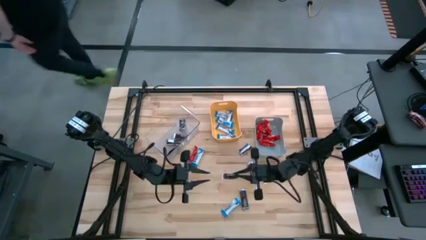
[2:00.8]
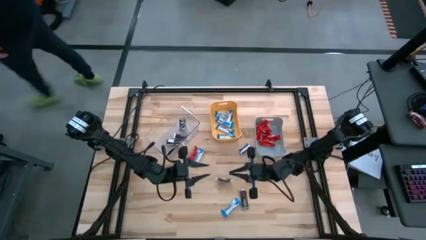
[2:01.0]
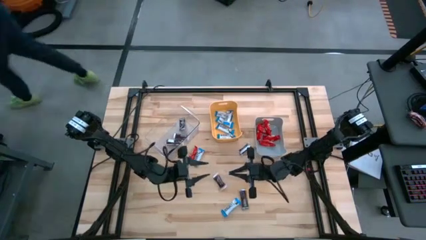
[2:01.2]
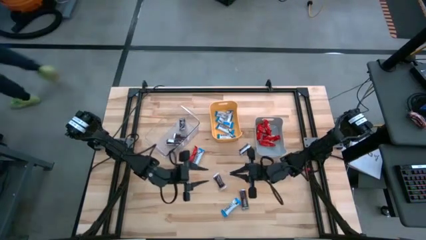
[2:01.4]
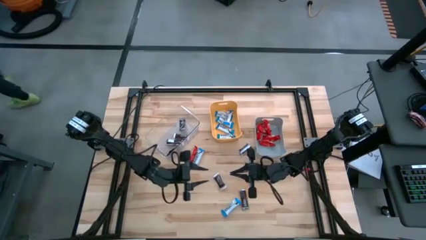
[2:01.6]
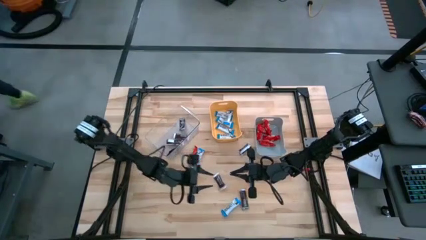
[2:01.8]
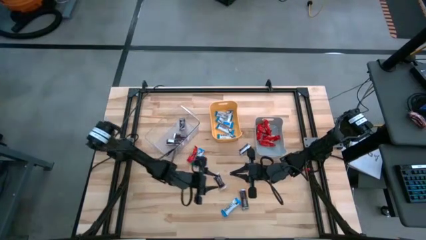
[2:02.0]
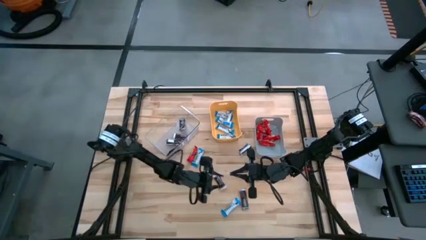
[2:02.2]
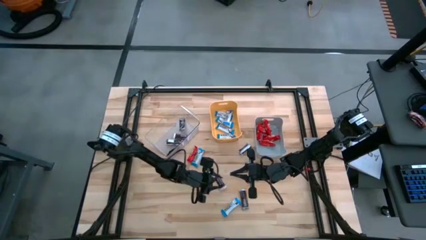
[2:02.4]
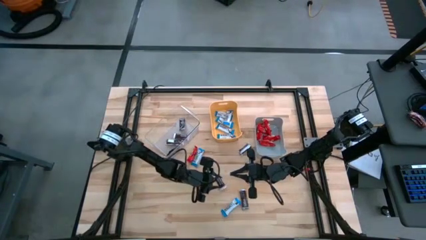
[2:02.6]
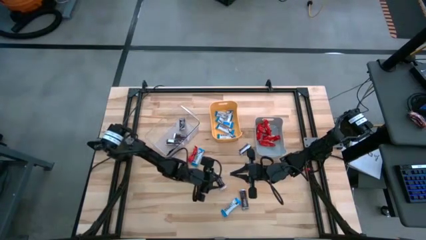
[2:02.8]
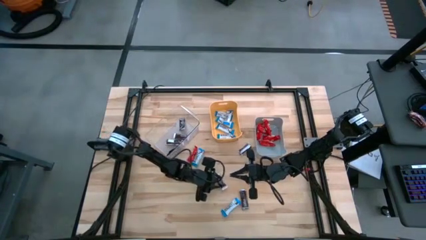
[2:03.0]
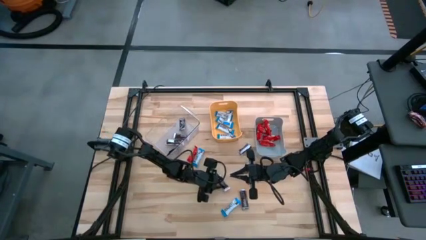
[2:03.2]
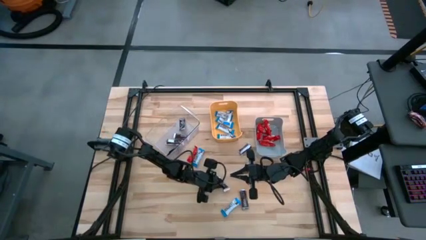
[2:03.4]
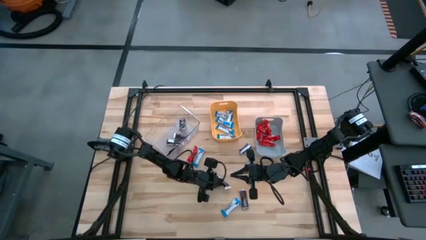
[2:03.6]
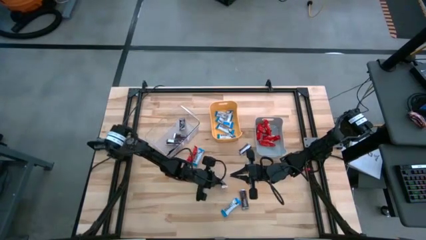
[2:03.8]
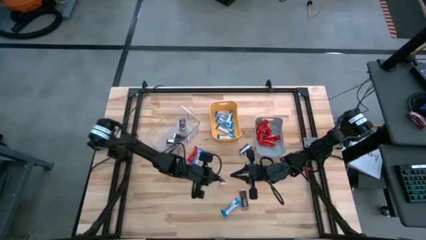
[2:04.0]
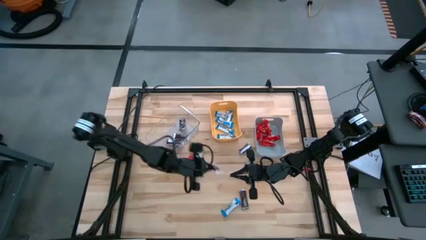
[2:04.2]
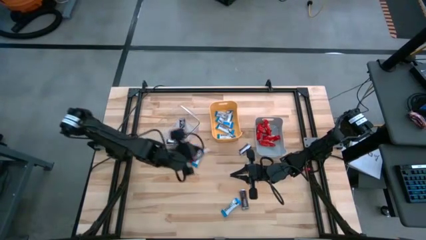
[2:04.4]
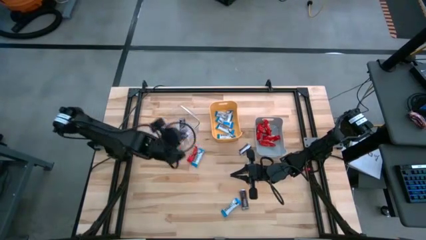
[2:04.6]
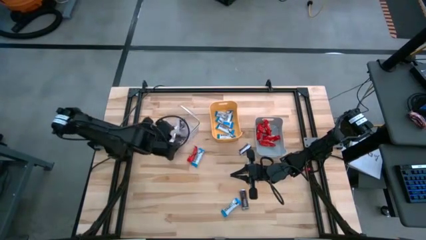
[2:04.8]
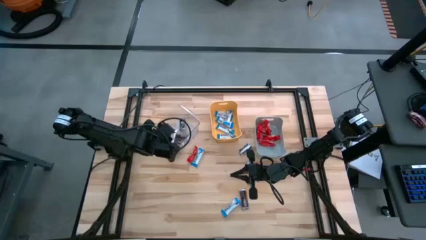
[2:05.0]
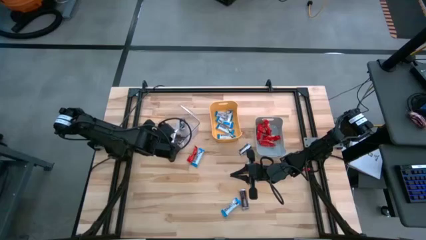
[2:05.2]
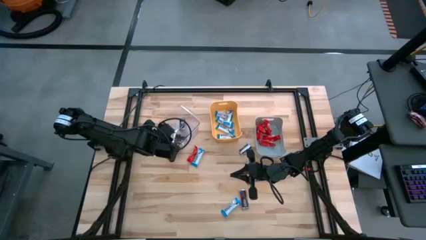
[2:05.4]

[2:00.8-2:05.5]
Task: Organize candy in baskets
Put the brown chocolate into the transparent bin

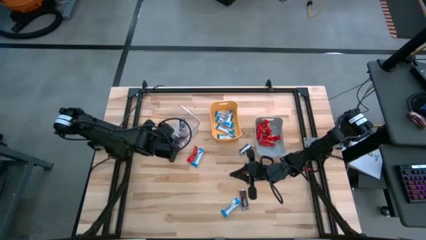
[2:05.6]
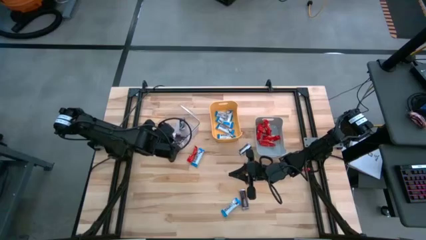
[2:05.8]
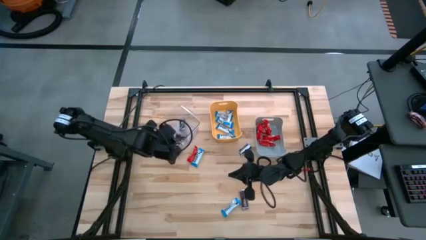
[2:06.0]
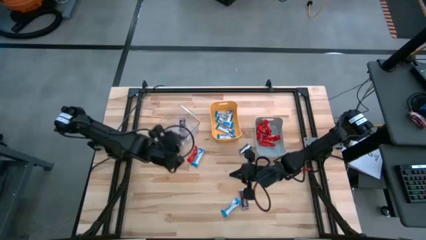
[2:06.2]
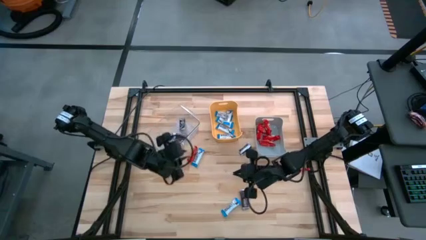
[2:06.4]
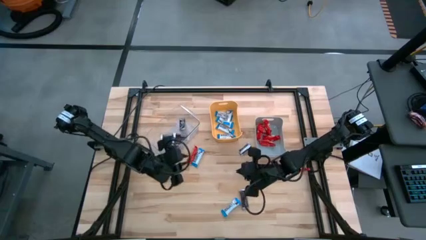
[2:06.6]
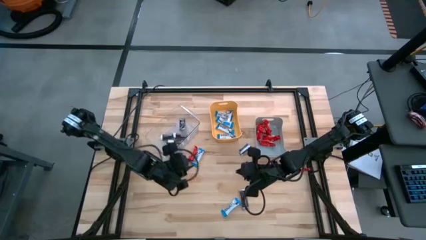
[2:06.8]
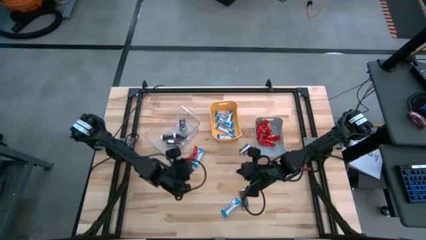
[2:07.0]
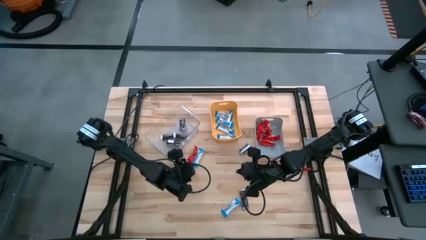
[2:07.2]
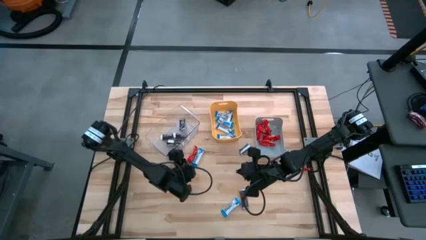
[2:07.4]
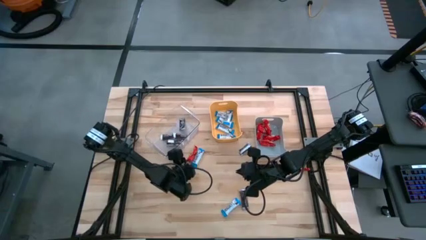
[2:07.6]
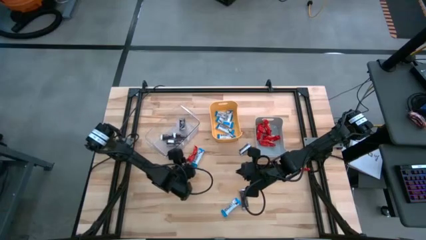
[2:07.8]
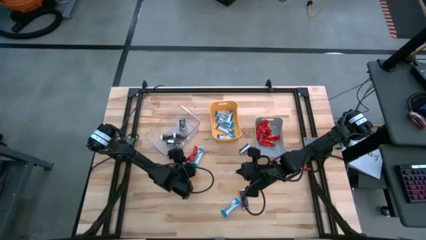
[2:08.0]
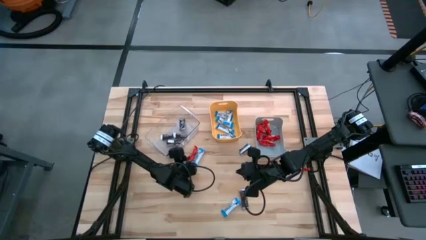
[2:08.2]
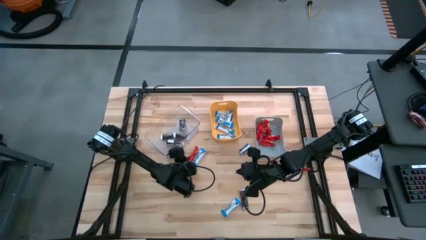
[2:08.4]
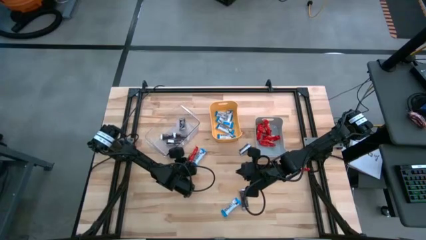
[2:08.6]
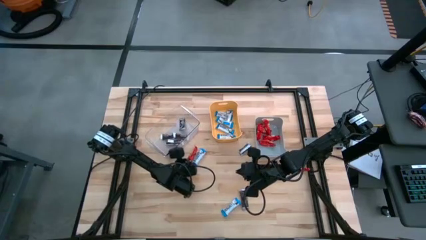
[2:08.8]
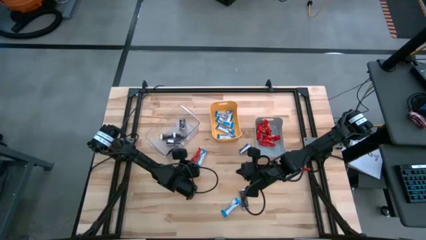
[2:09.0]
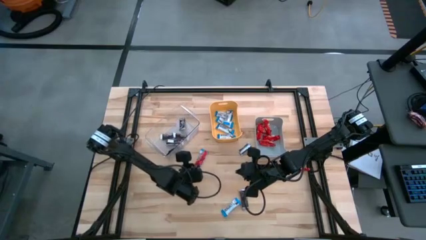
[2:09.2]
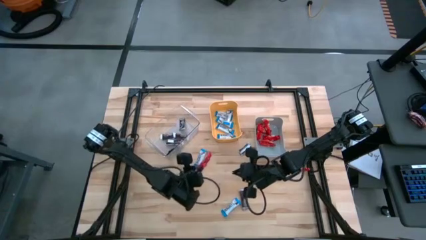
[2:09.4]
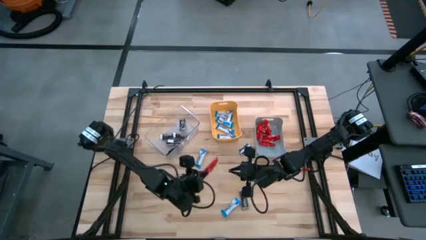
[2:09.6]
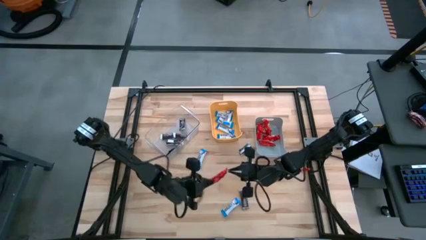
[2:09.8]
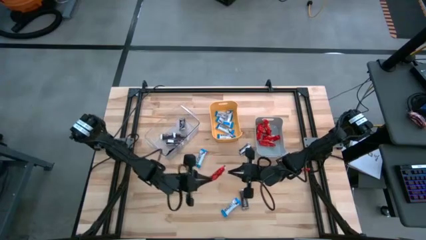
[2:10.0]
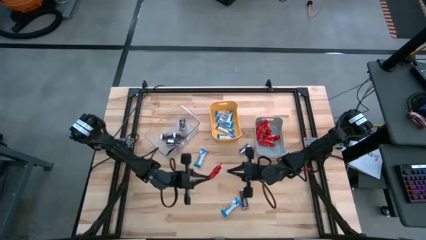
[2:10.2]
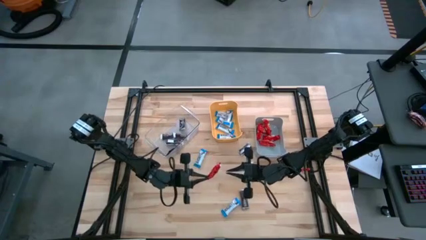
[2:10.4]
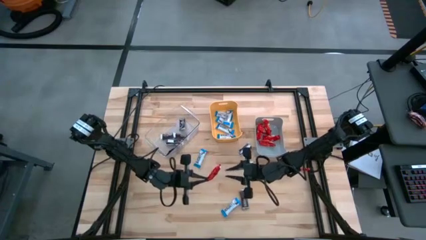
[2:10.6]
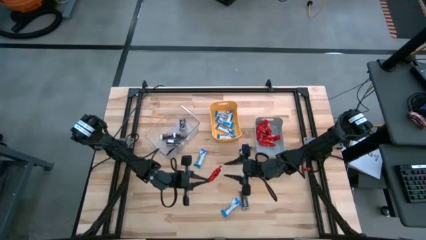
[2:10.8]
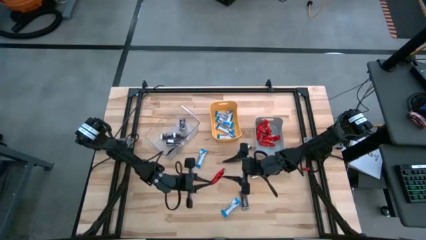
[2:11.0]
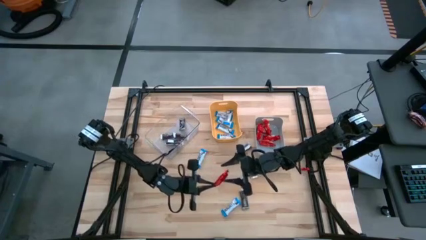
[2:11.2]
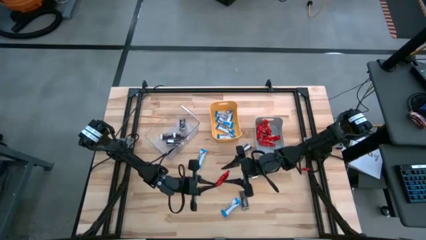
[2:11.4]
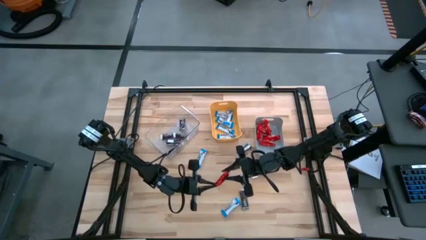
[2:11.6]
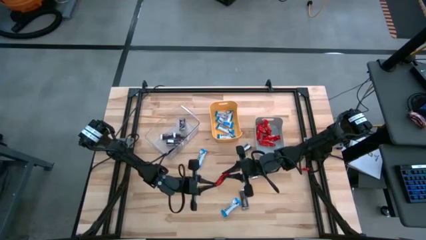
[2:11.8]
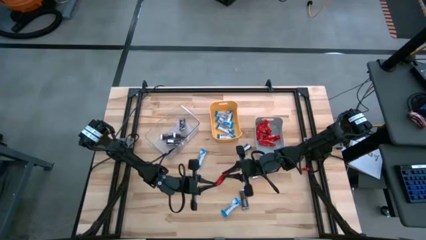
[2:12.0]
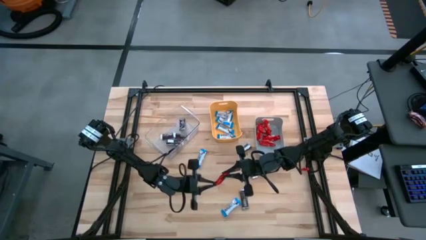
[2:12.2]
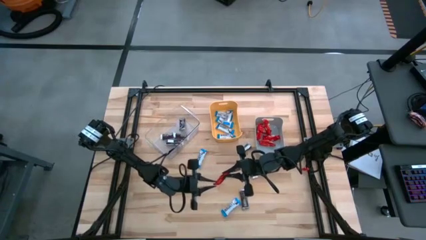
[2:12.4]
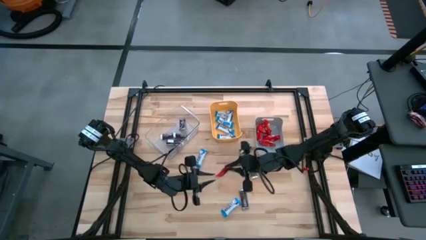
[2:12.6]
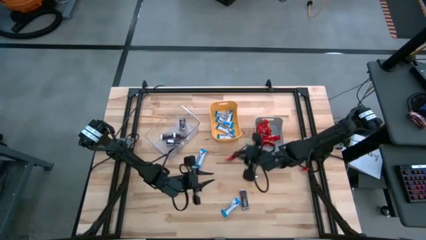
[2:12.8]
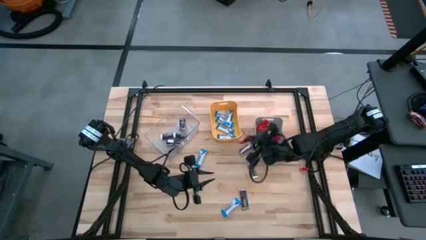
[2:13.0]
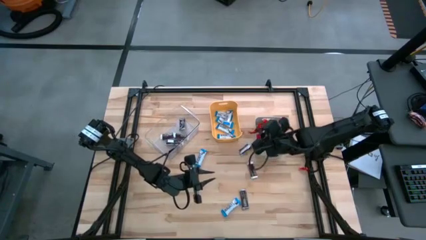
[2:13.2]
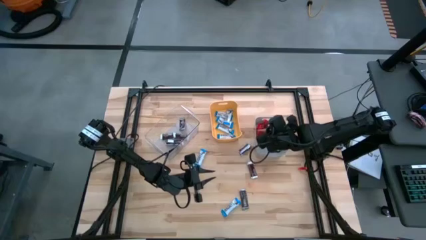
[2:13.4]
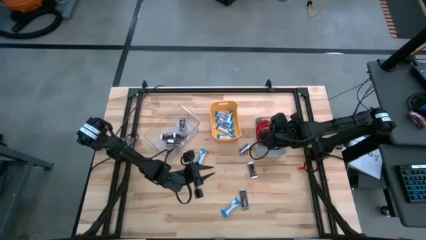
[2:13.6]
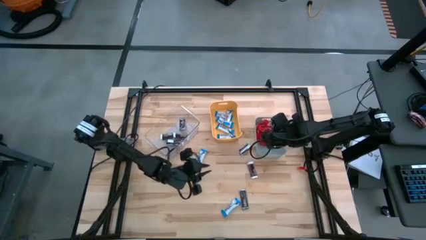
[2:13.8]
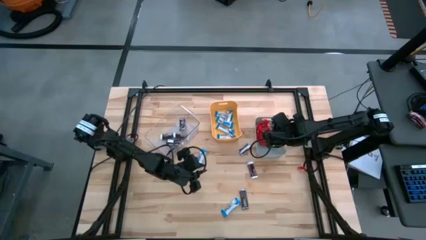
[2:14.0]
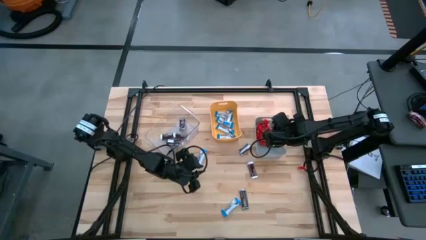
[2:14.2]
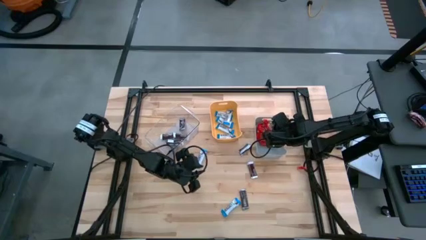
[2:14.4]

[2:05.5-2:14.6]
Put the red chocolate into the gray bin

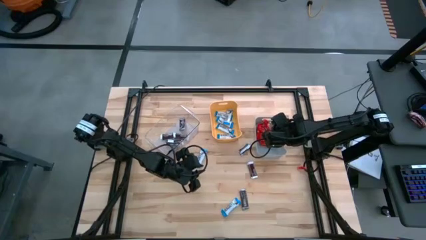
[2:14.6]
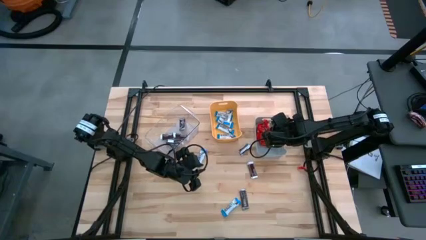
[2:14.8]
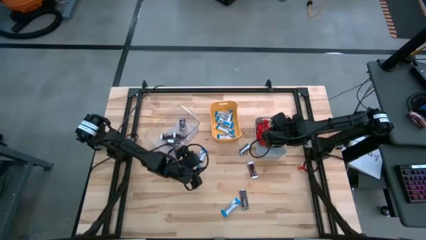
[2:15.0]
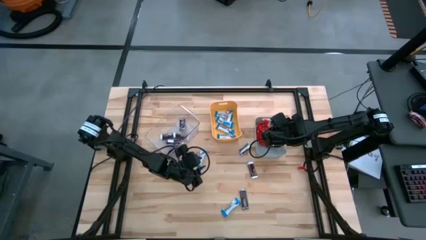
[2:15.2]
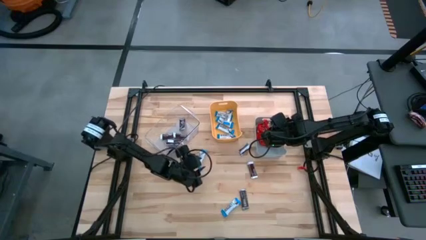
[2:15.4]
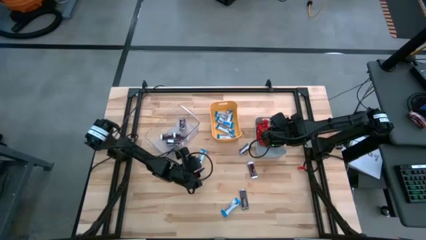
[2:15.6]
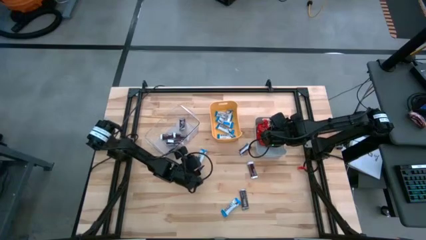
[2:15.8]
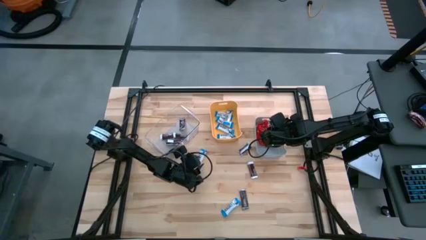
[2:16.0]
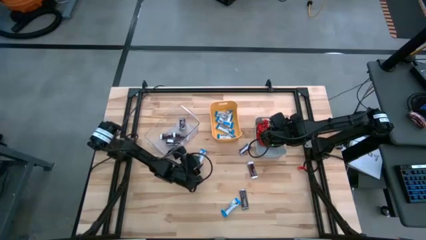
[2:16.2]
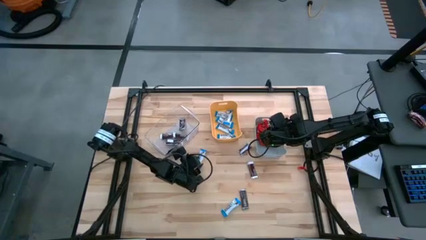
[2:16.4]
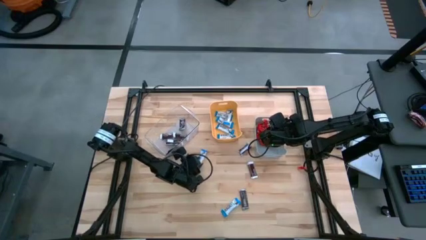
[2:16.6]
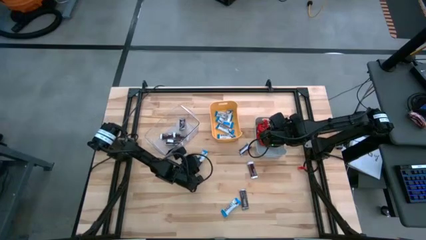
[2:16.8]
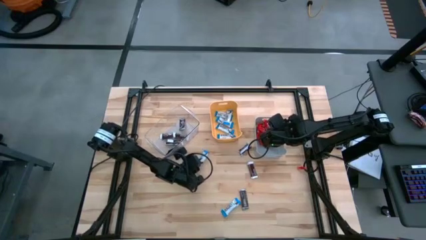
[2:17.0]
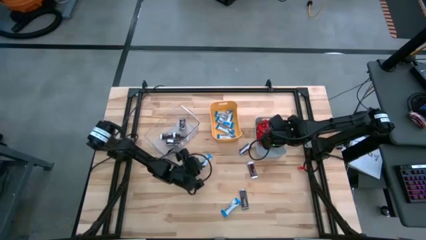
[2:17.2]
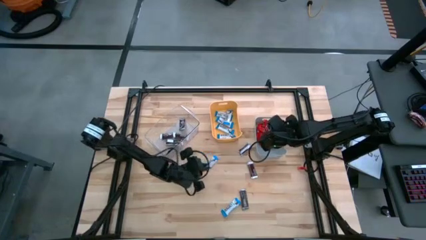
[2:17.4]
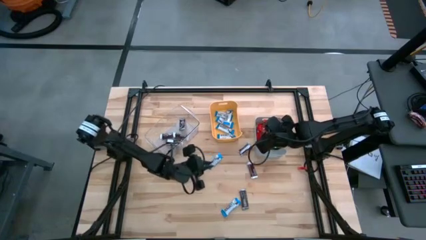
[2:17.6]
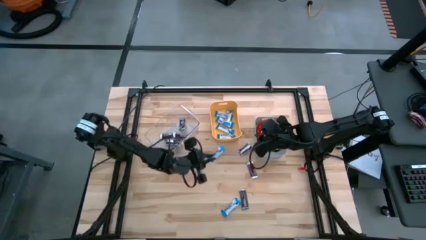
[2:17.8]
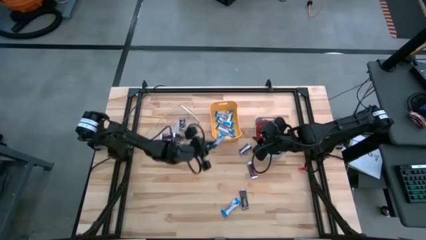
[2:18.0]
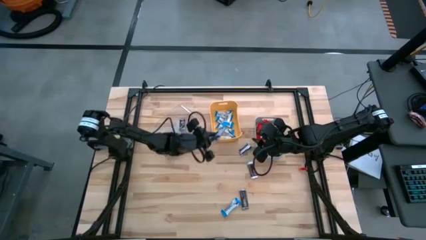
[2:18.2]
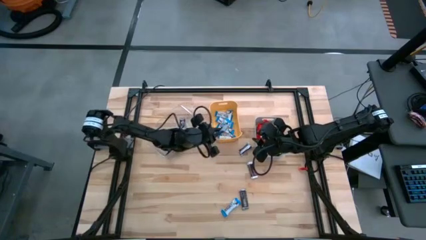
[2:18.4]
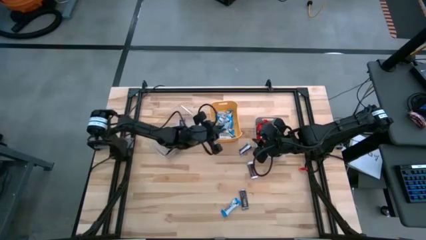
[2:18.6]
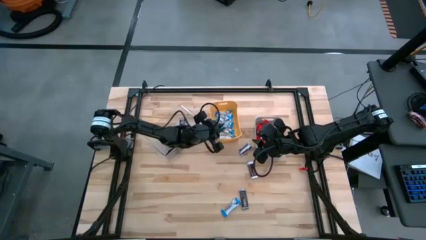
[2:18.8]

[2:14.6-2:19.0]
Put the white chocolate into the yellow bin
